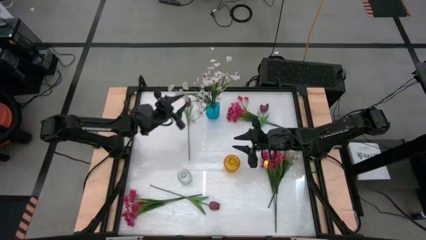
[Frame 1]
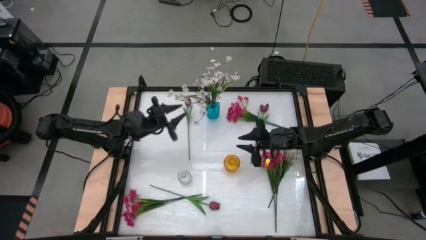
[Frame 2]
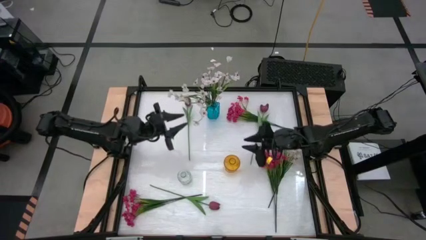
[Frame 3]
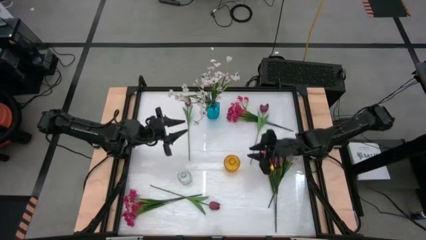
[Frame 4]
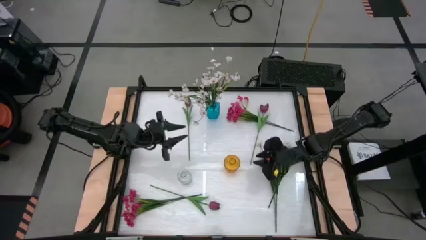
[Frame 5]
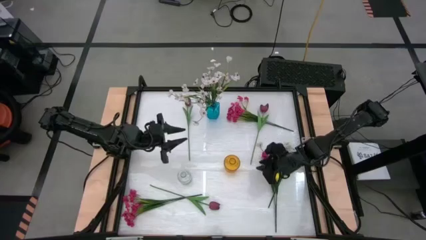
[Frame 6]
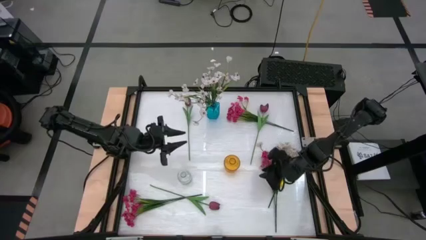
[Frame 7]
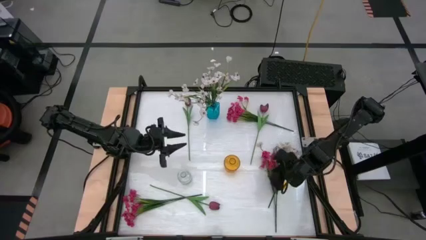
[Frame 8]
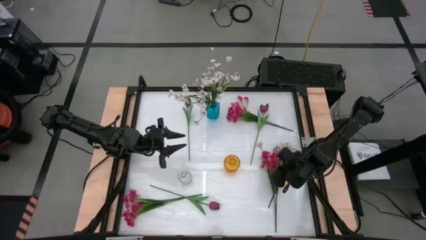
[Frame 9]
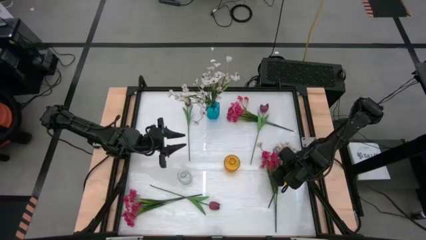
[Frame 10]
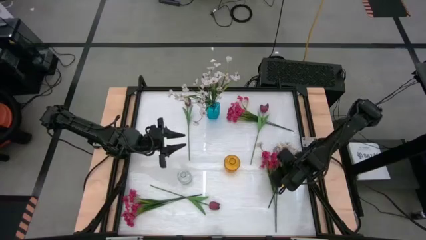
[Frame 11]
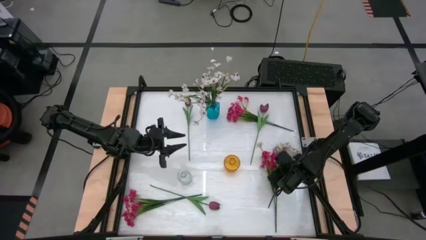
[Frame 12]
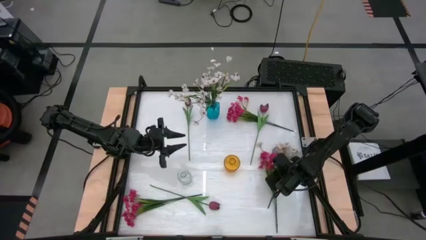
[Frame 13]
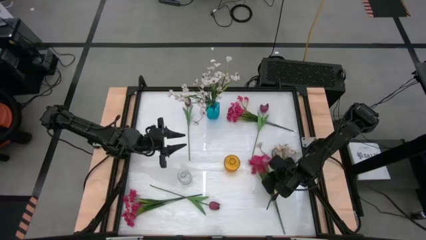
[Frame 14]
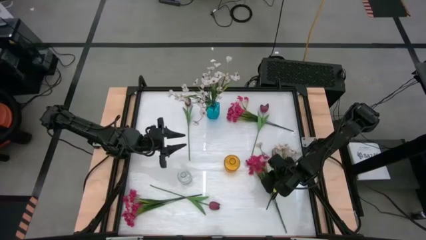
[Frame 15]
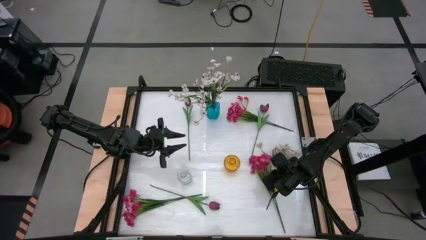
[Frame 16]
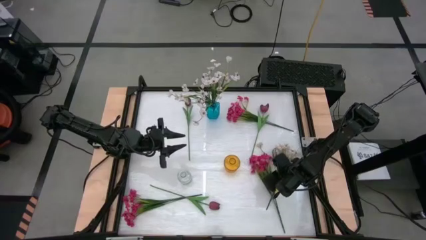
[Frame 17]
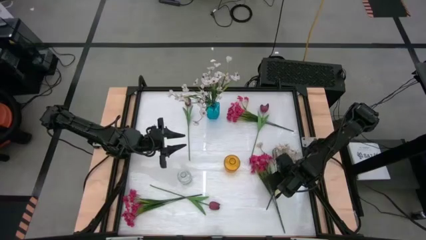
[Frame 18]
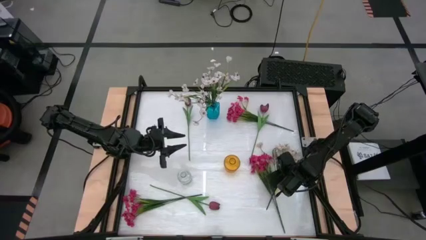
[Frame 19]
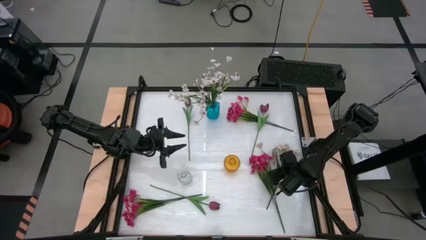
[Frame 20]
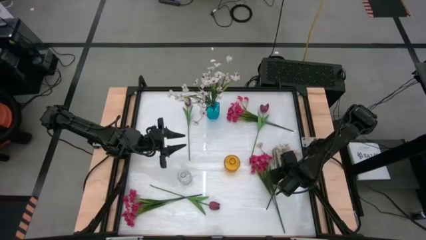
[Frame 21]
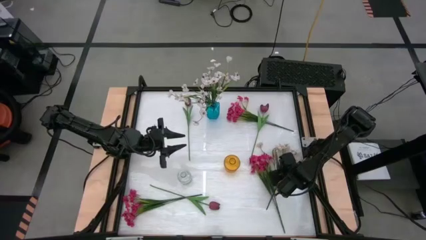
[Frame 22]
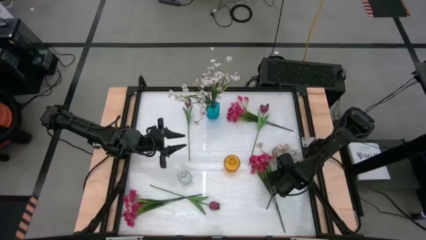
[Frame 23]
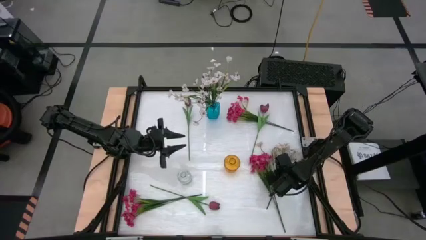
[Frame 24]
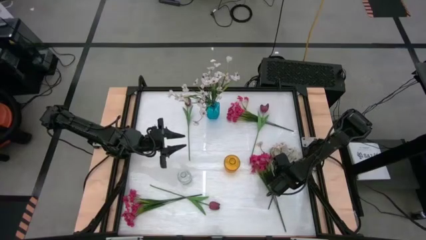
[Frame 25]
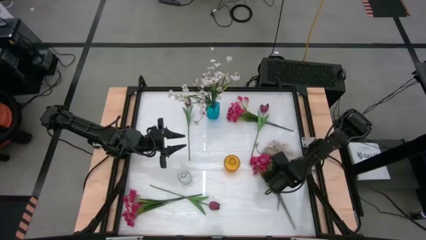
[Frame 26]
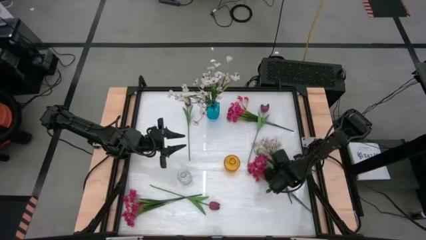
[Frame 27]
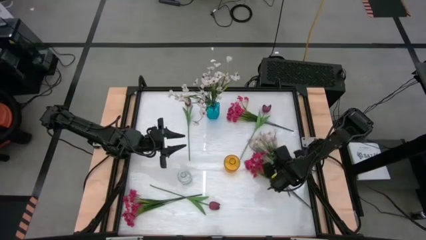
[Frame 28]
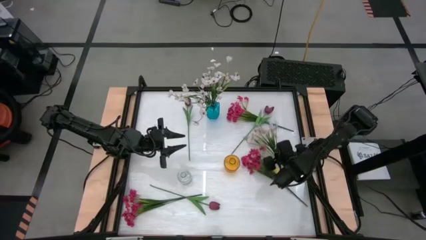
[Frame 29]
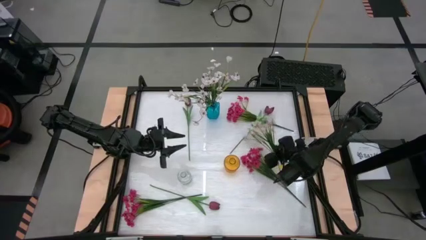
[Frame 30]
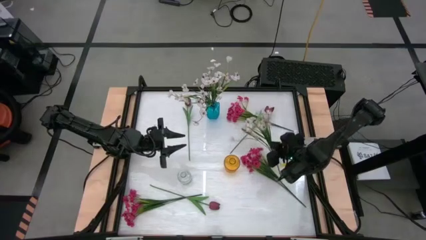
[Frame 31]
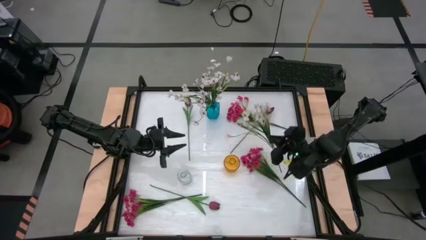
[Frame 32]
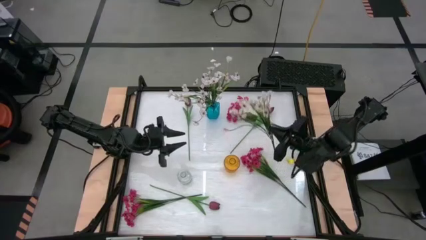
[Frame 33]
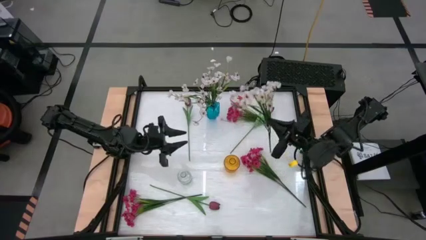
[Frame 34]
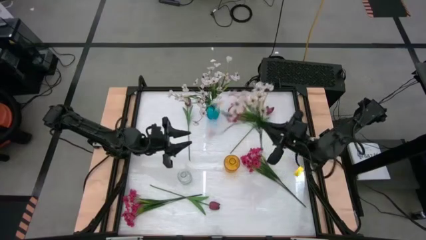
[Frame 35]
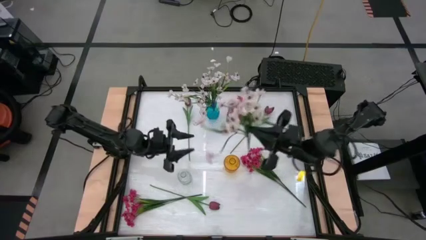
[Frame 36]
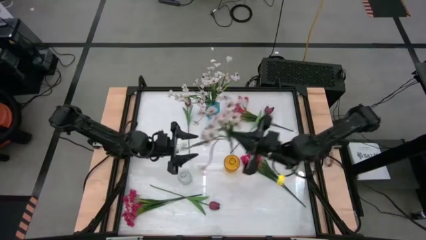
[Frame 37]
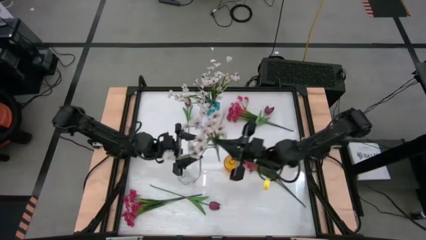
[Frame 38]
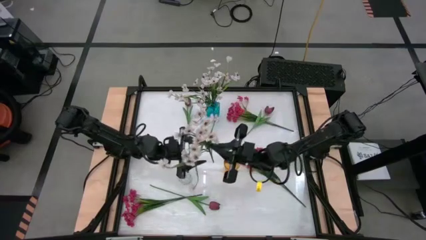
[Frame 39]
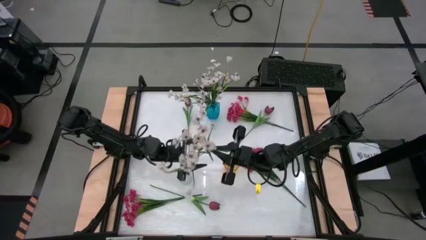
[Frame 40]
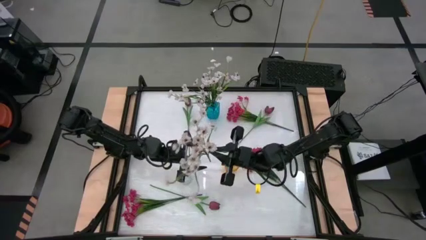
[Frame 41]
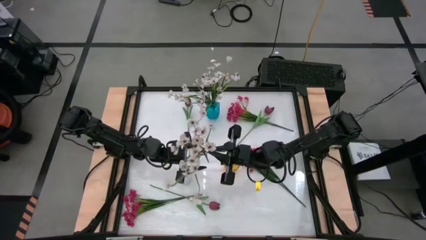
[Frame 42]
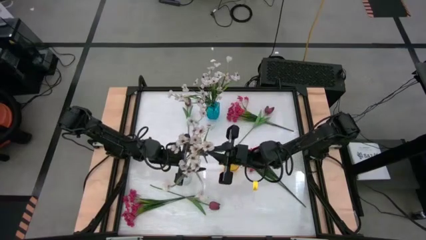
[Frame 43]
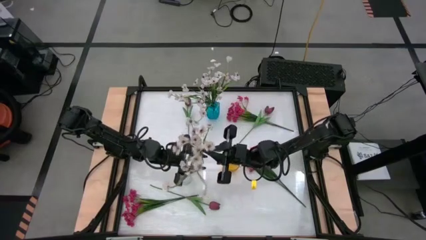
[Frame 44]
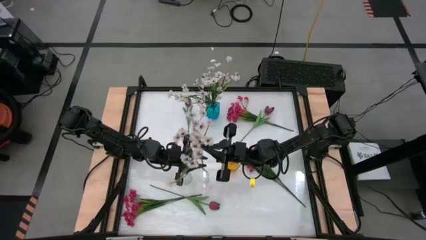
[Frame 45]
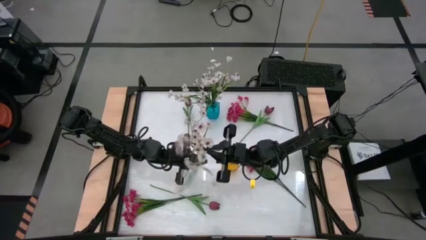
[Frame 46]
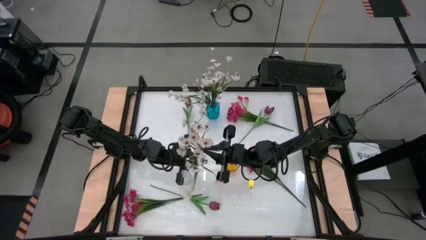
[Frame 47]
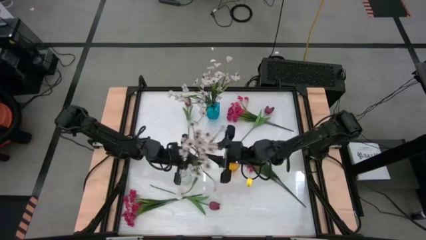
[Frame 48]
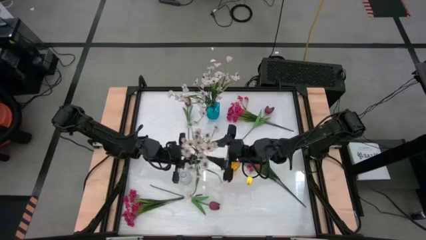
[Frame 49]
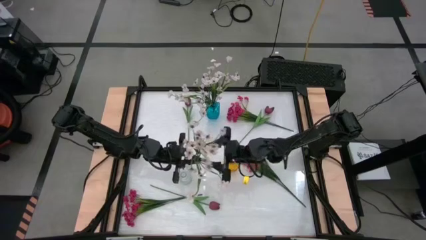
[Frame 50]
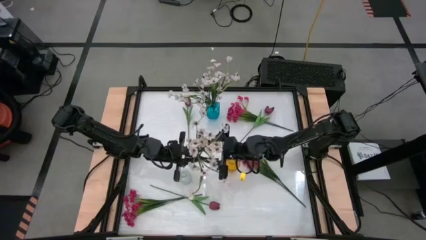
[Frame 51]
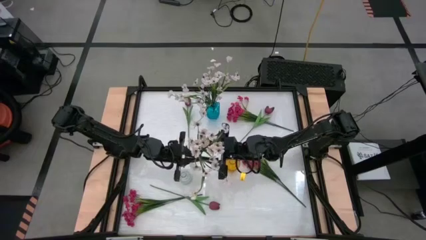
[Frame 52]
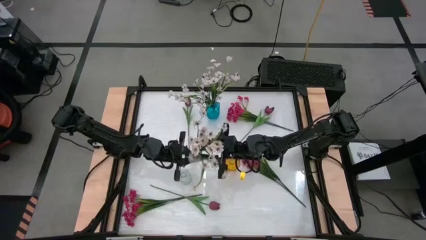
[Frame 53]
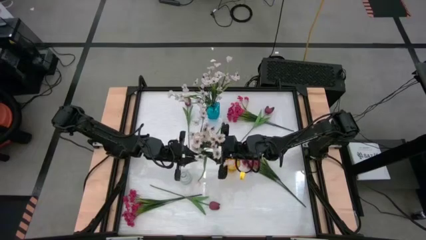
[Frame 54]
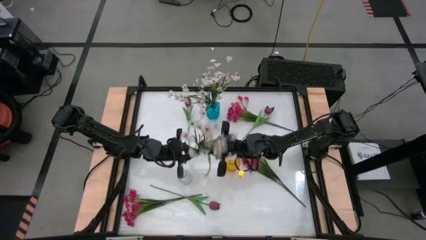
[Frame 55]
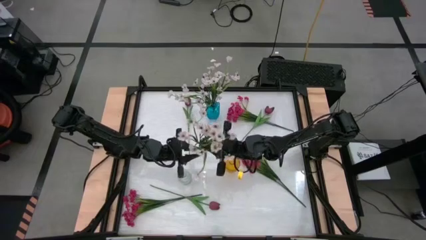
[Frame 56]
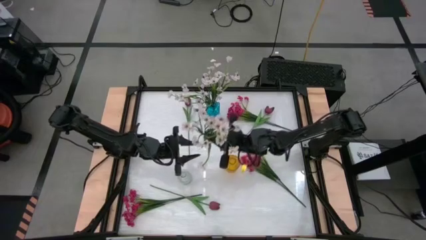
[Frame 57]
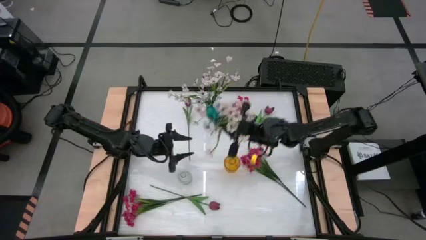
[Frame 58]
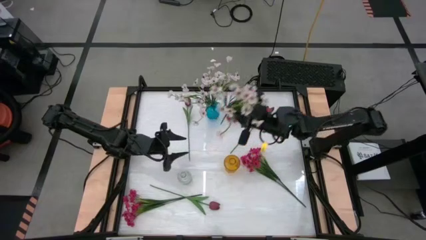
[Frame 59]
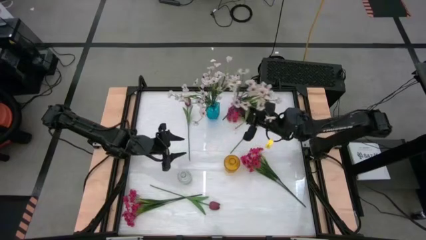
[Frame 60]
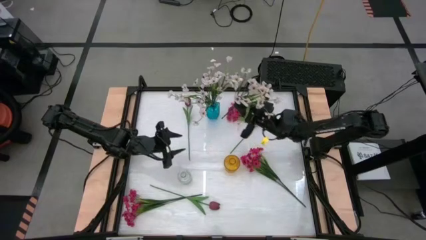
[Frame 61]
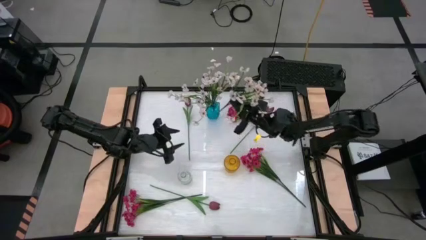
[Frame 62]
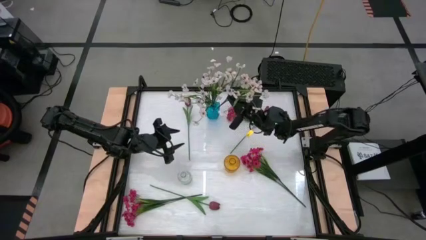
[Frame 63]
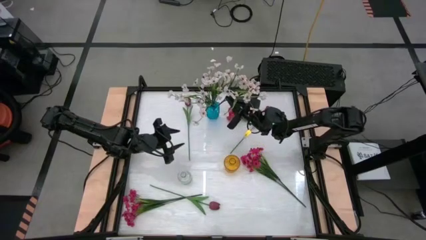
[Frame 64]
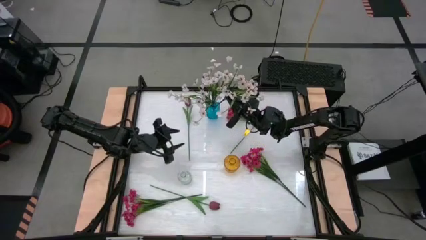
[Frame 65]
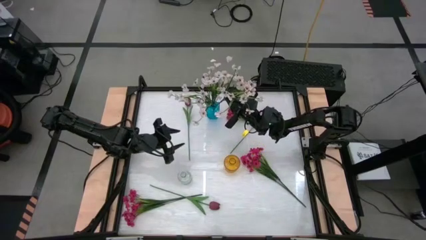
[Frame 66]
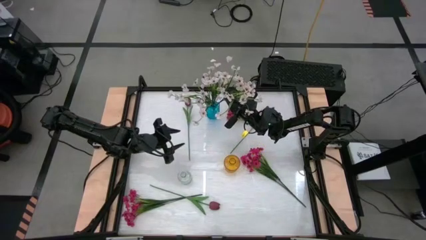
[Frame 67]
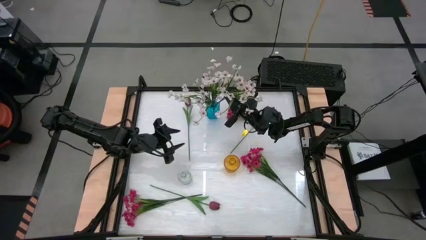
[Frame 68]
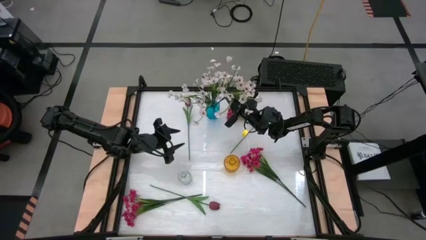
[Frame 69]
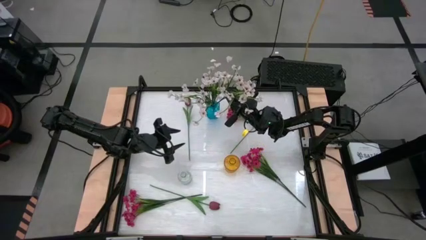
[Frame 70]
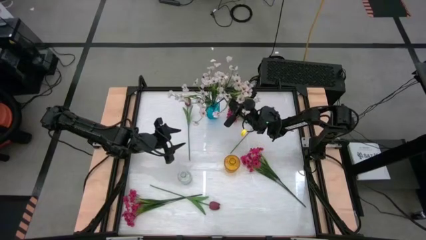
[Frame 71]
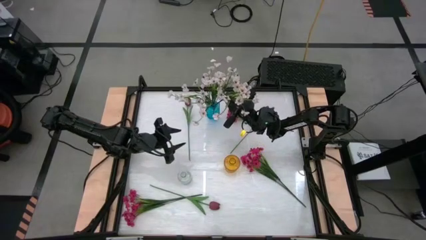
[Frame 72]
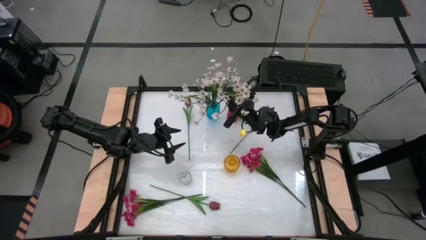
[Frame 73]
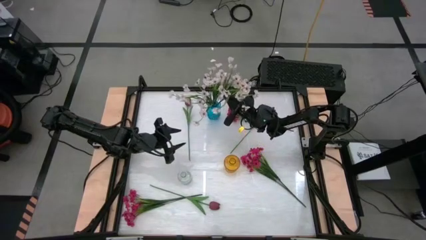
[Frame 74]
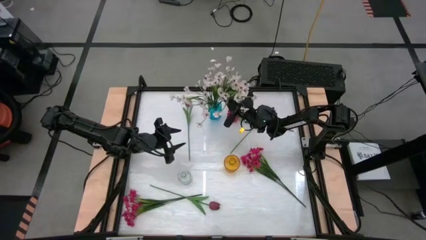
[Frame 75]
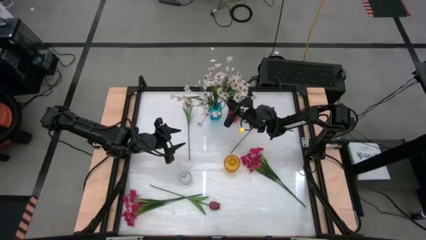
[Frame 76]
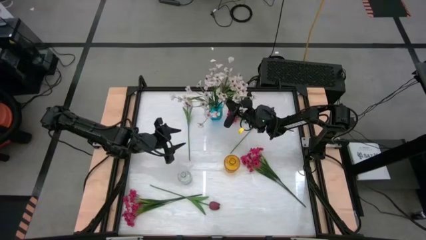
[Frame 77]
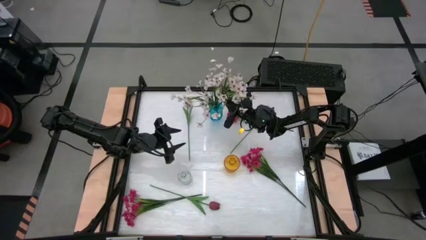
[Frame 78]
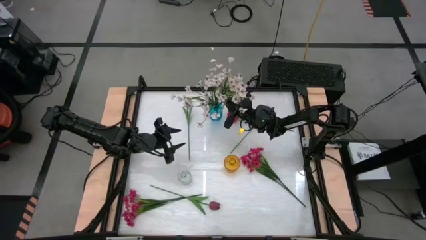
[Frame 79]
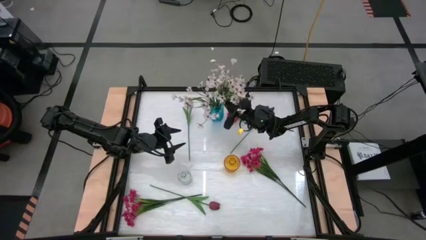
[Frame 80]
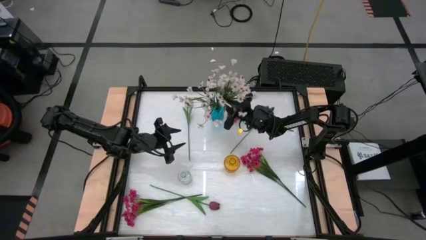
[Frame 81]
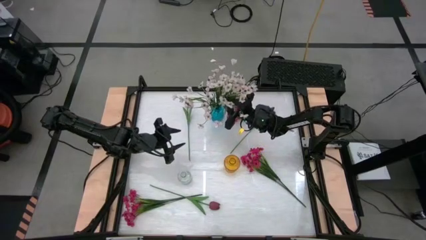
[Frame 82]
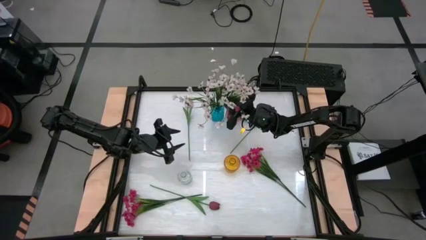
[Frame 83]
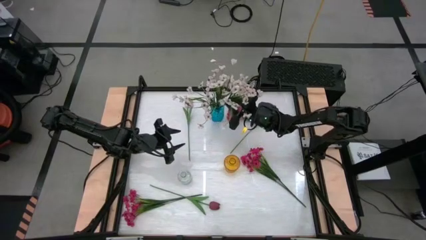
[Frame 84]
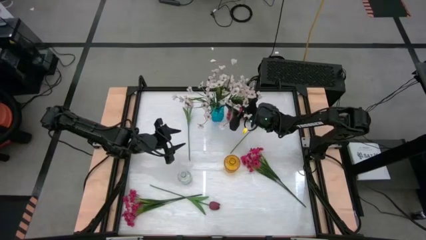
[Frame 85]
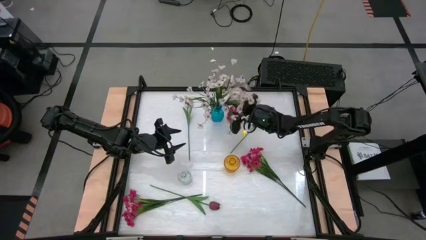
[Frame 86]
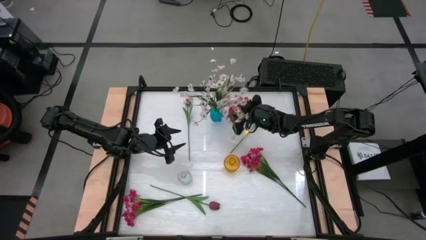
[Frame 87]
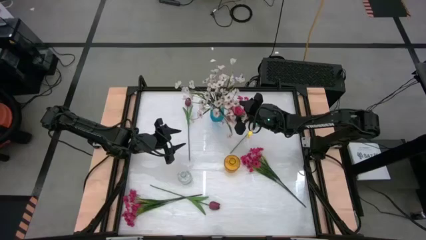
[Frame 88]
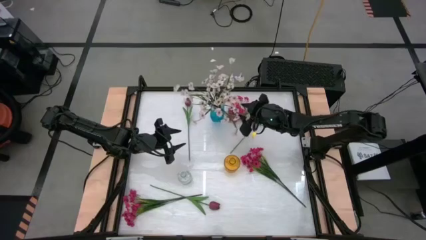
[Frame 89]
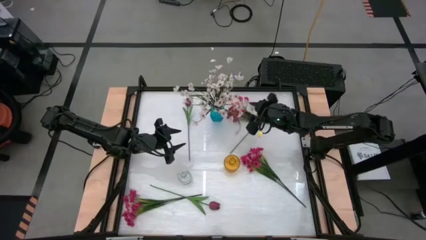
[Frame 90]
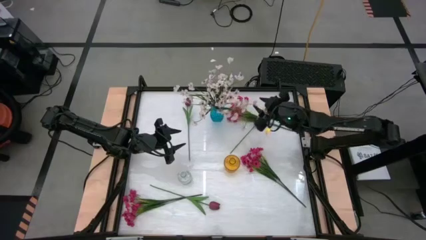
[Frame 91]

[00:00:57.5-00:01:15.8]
Task: Sort flowers into vase by color
Put the white flowers into the blue vase
